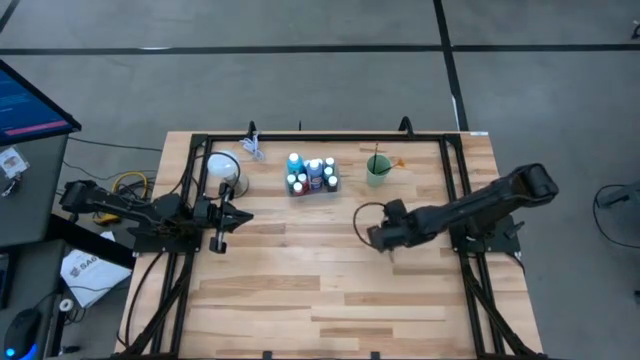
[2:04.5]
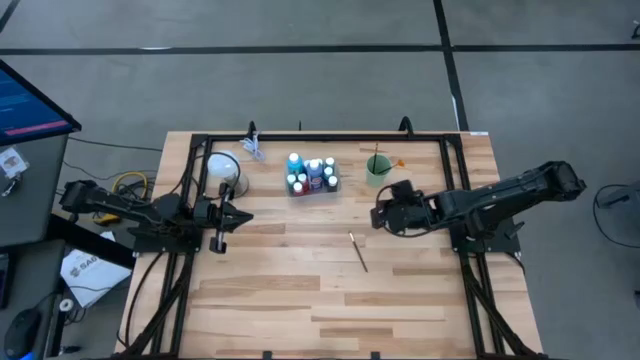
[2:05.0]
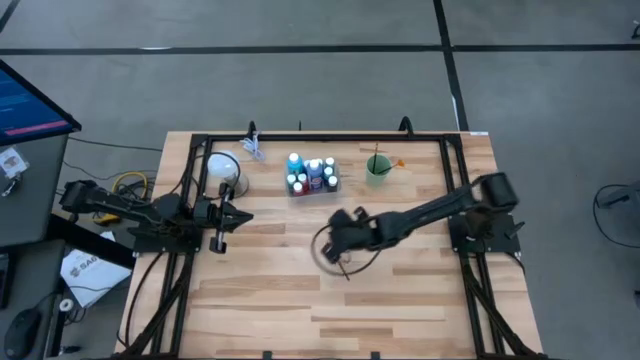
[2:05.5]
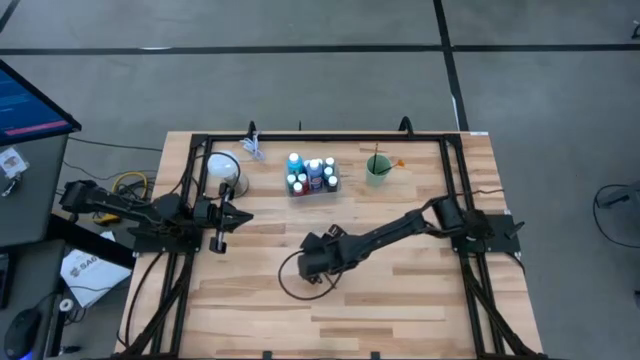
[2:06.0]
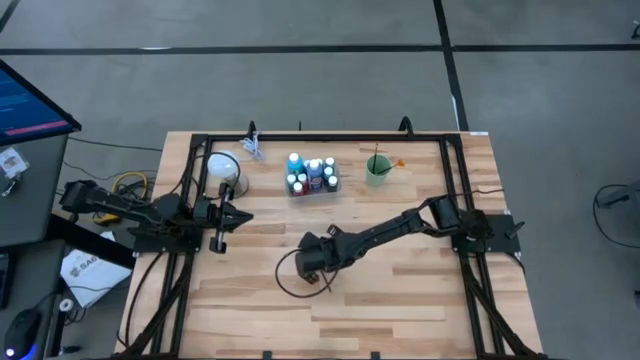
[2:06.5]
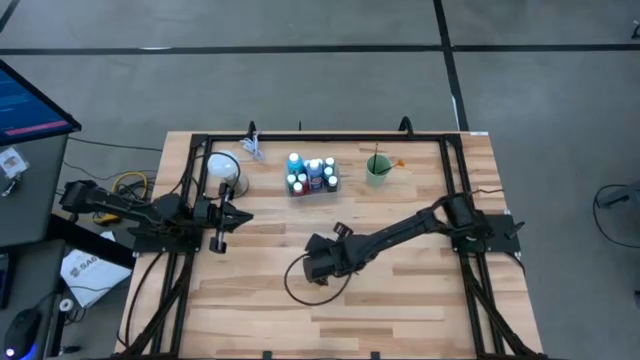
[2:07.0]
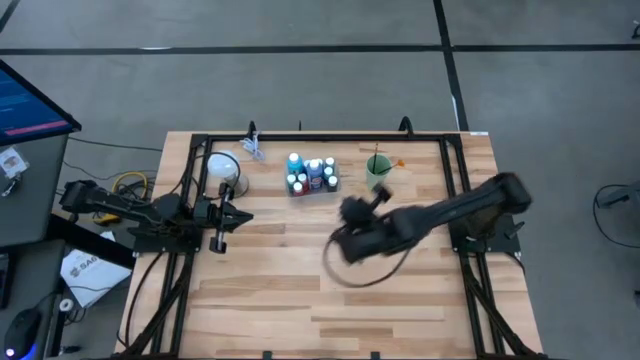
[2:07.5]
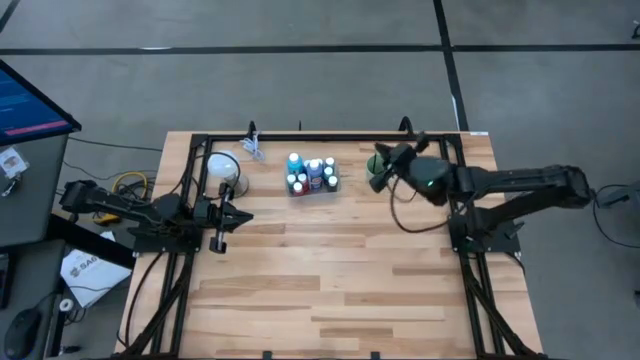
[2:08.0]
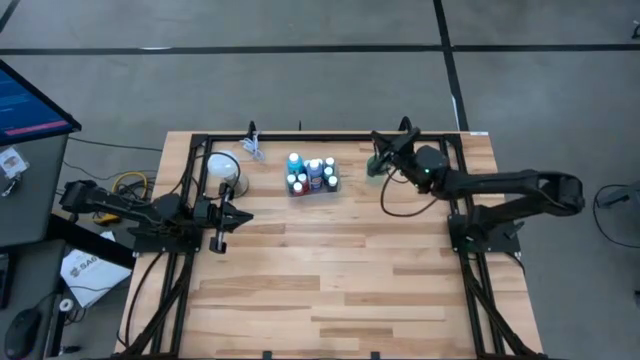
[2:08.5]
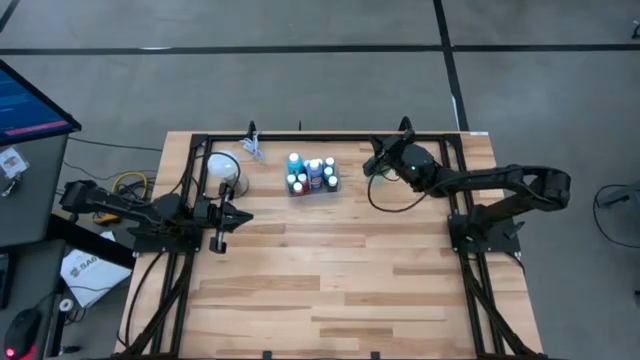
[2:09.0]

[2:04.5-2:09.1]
Task: Pick & Place Paint Supplies
Put the silver paint brush into the cup

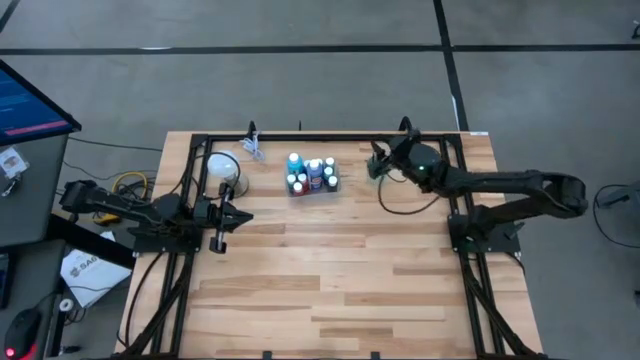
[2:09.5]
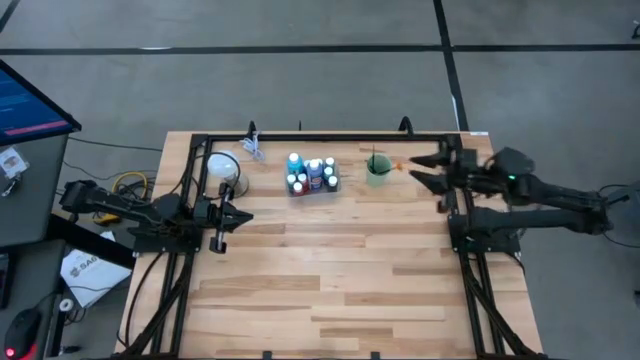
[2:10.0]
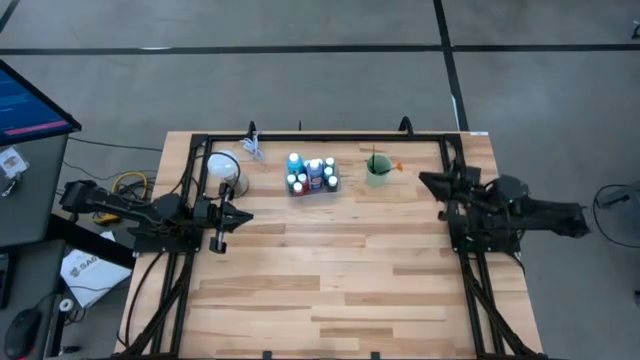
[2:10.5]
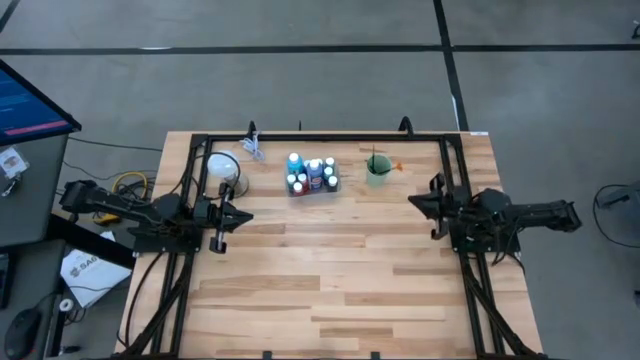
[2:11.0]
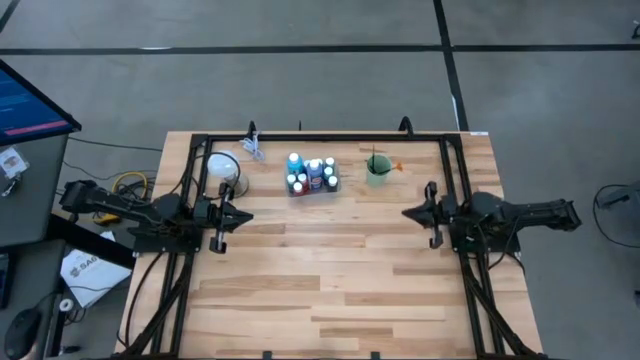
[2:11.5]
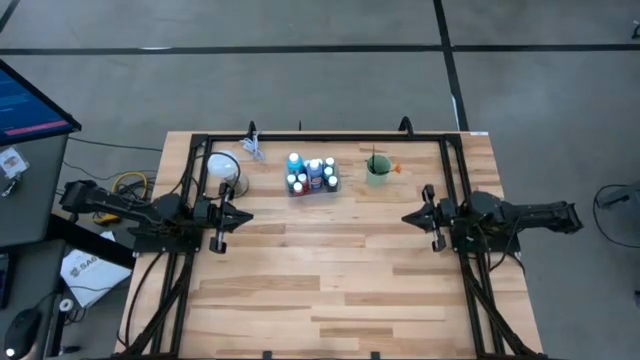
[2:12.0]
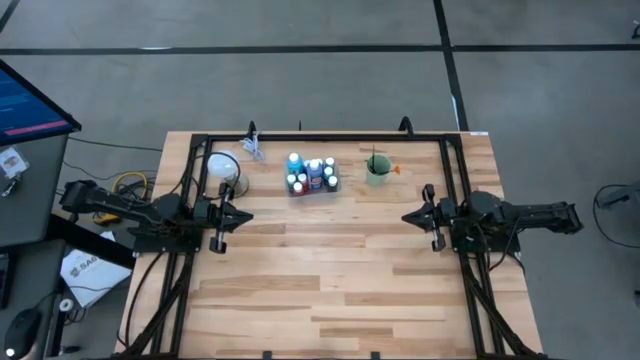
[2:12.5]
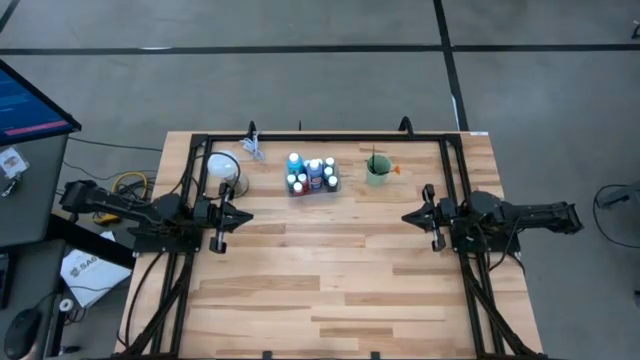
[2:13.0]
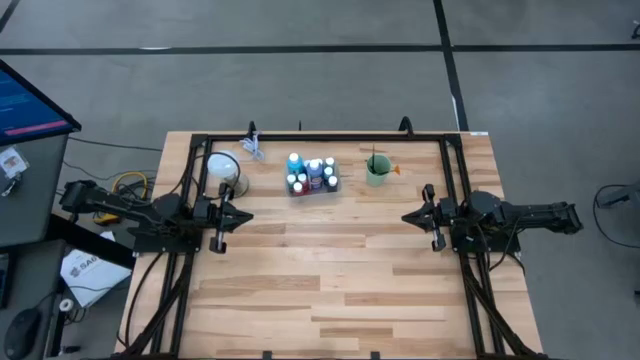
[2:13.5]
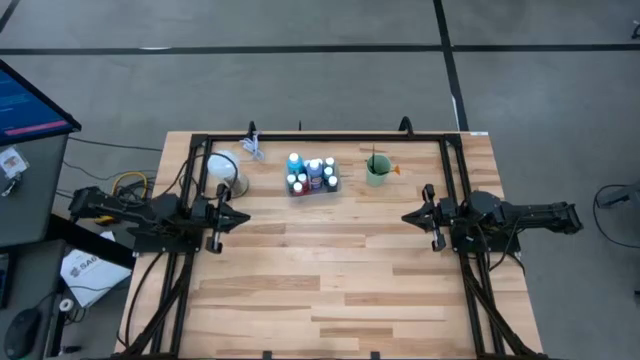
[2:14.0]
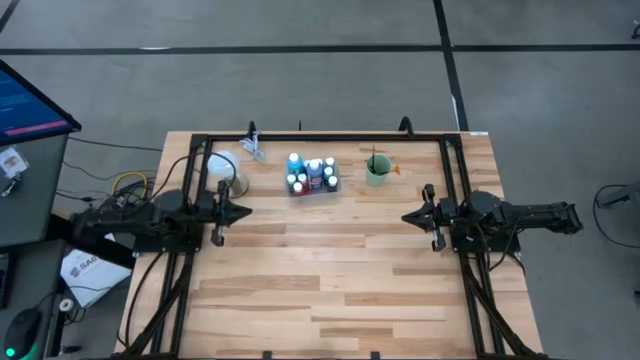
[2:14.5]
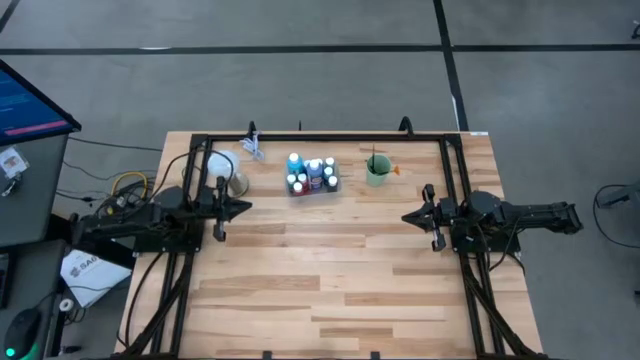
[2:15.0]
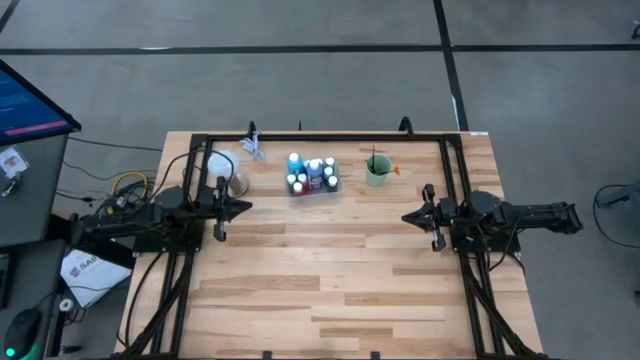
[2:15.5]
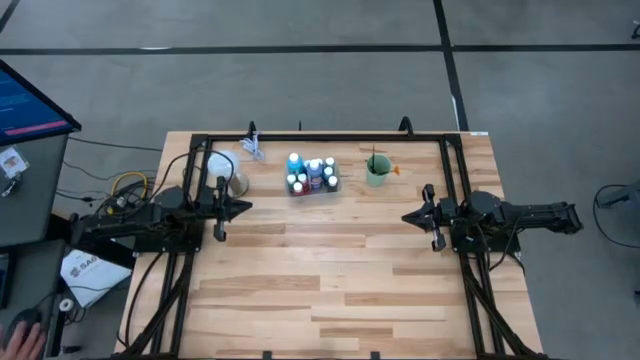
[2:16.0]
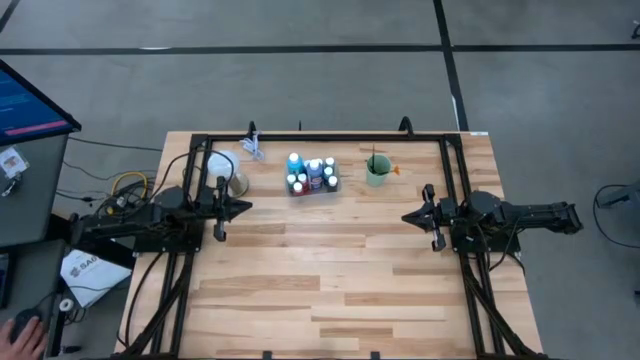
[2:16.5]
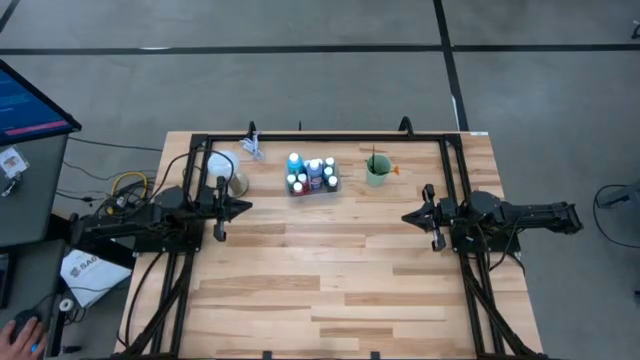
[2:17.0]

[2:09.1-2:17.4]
Return to Home Position

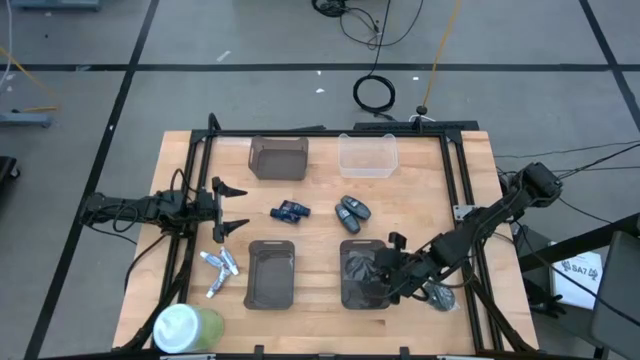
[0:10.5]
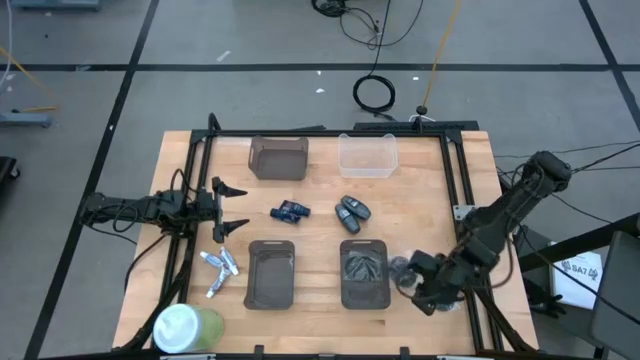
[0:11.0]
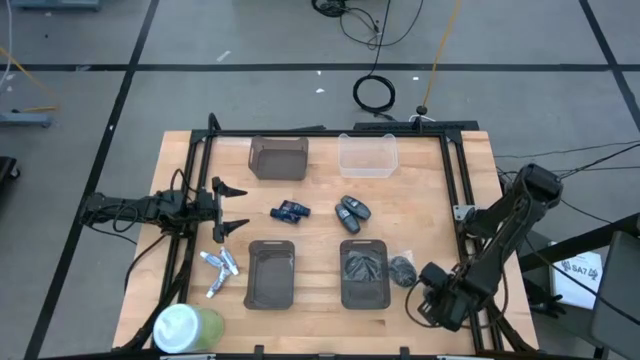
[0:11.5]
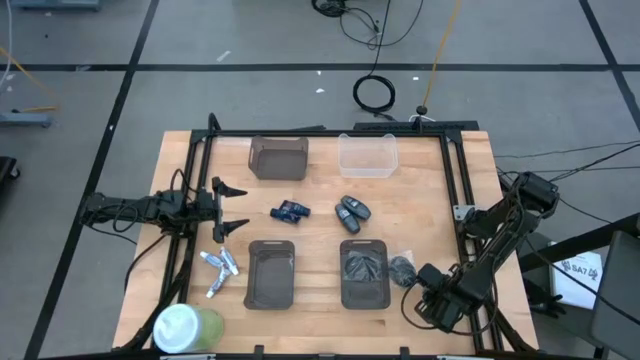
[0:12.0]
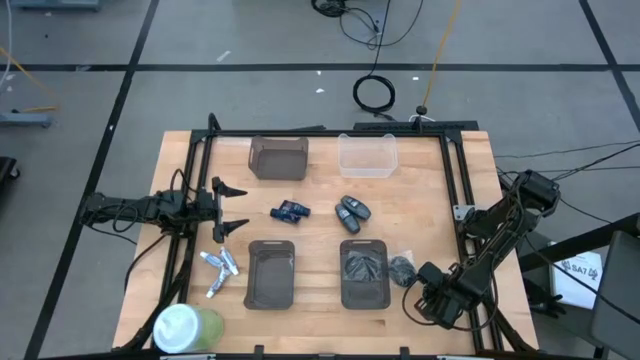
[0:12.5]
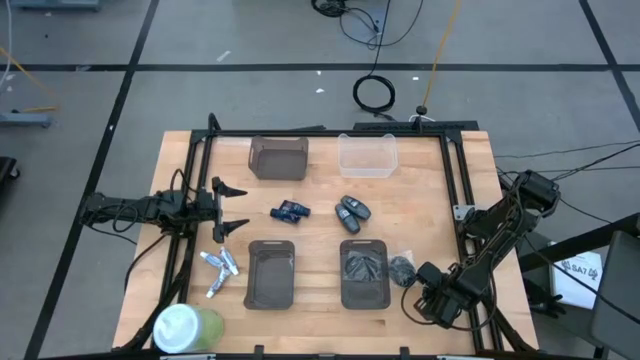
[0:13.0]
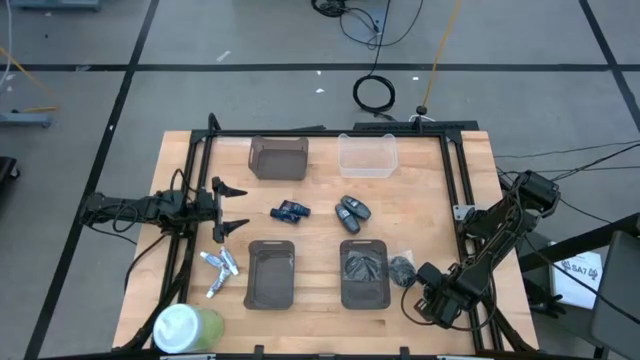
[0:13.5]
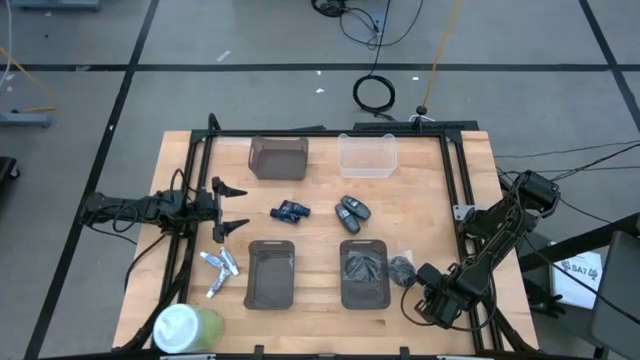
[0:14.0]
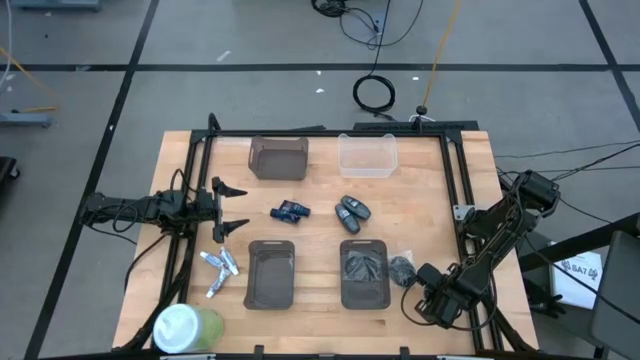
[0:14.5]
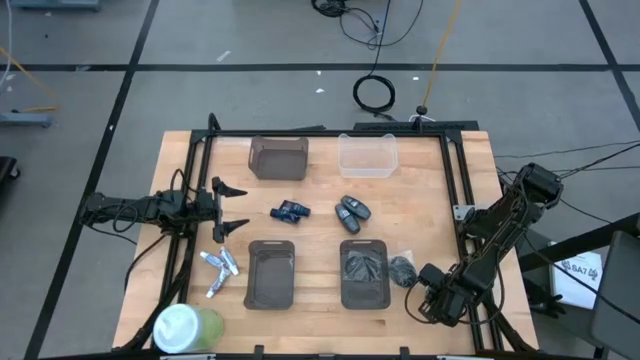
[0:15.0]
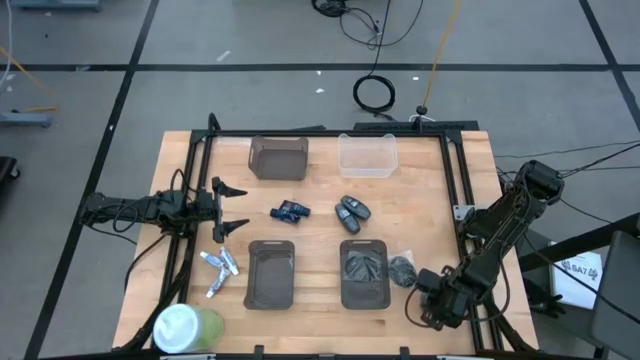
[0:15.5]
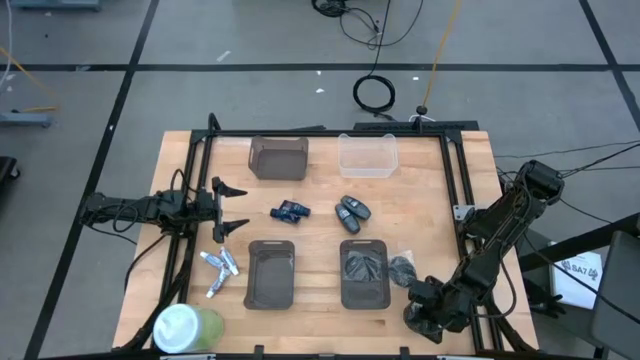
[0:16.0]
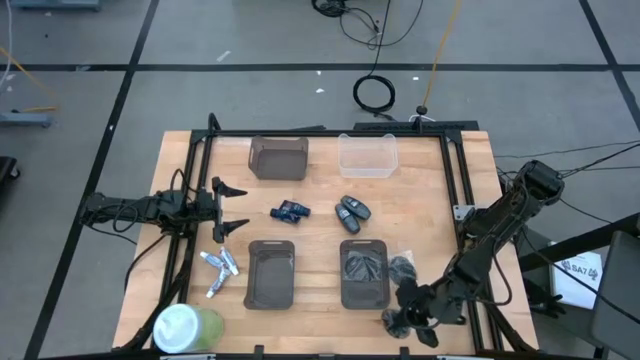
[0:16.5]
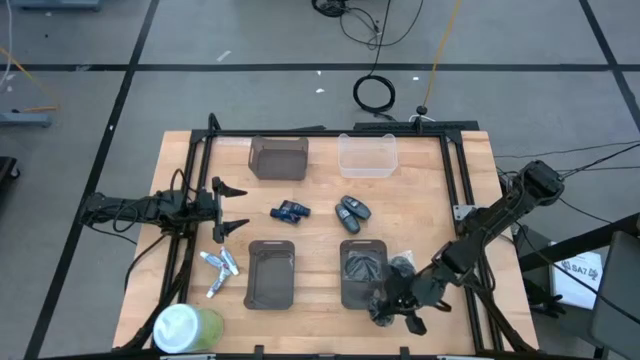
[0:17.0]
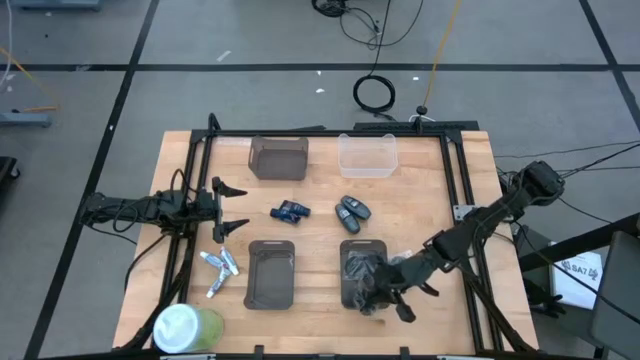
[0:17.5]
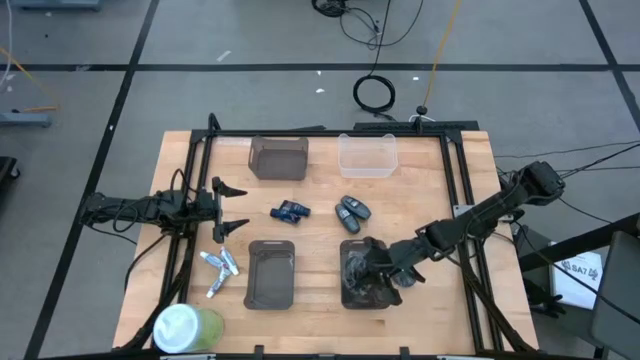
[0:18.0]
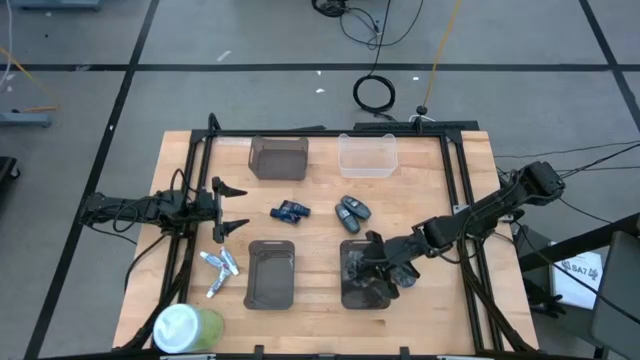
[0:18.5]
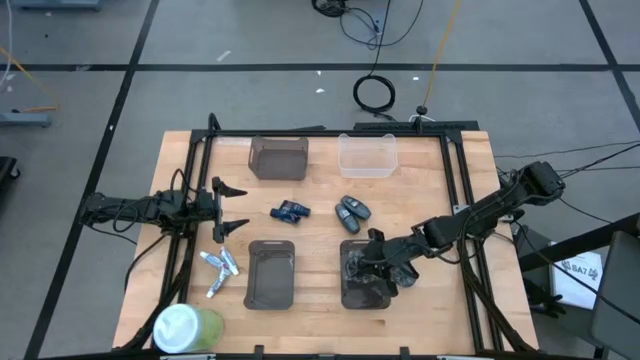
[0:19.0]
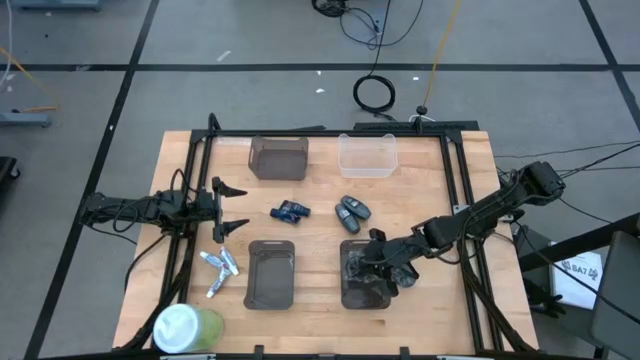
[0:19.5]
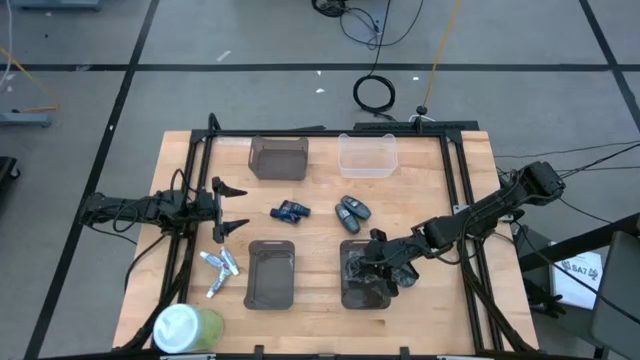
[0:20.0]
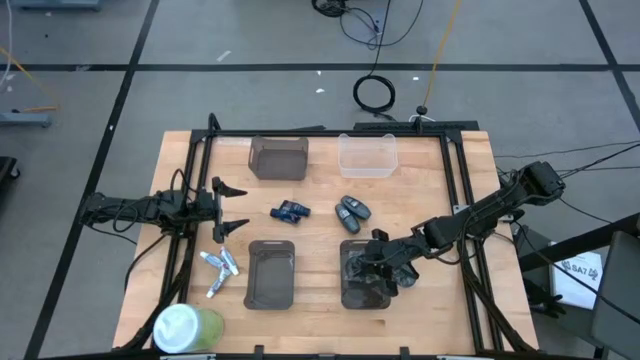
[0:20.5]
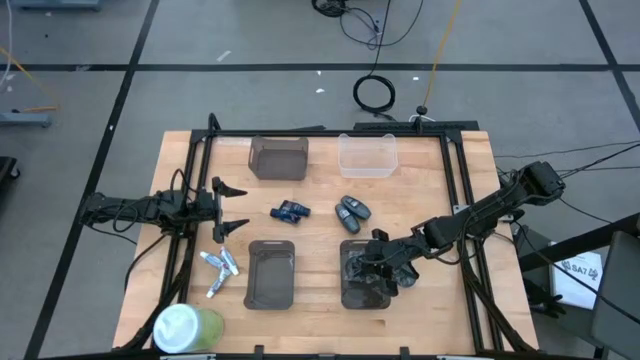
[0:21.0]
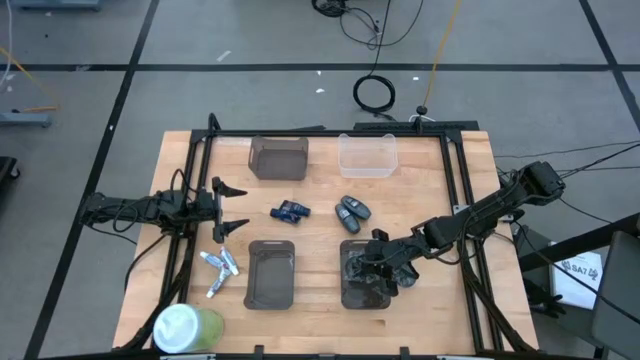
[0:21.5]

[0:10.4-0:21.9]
Task: Pick & Place Travel size toiletries
Put the right black hairbrush into the bottom right black bin
